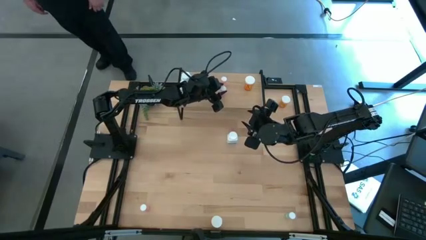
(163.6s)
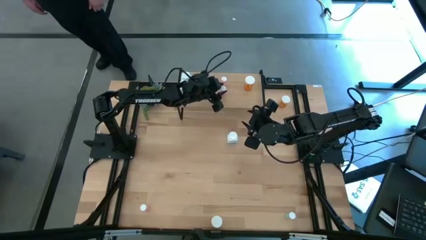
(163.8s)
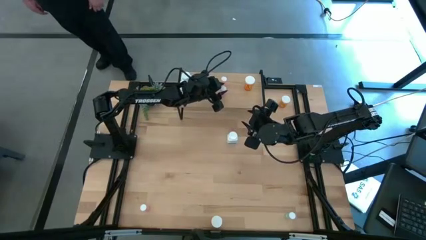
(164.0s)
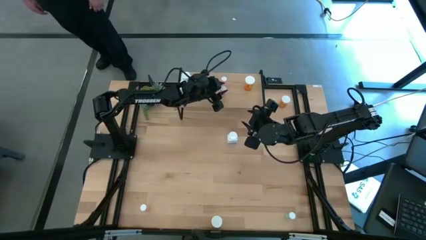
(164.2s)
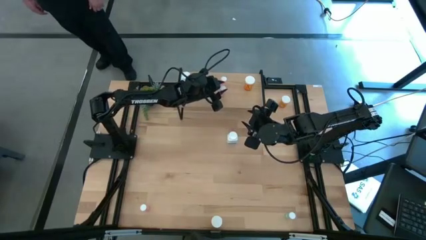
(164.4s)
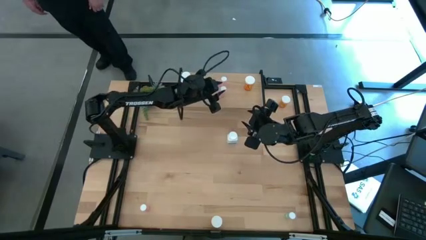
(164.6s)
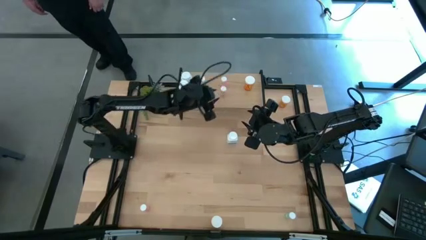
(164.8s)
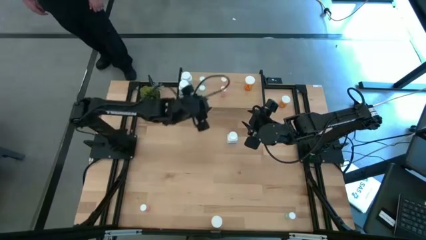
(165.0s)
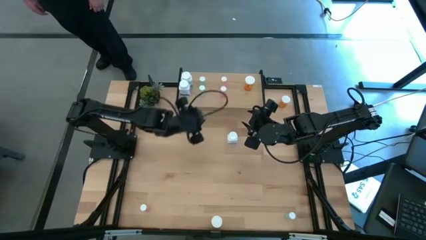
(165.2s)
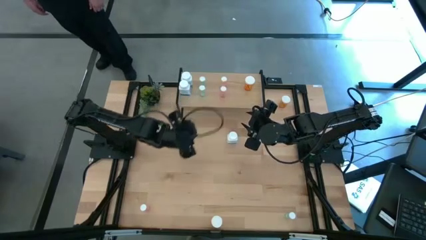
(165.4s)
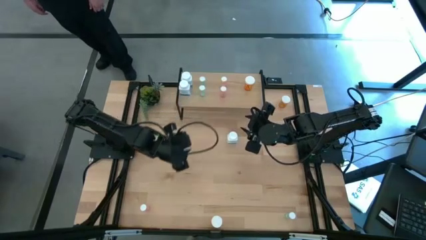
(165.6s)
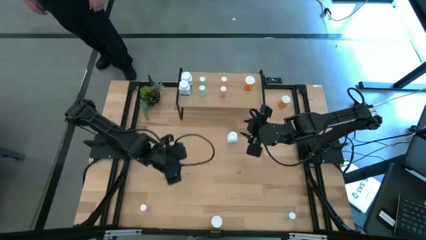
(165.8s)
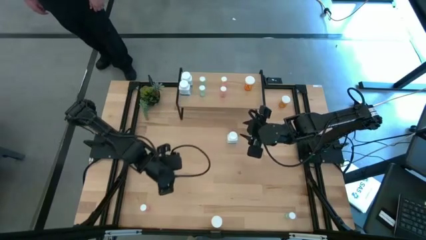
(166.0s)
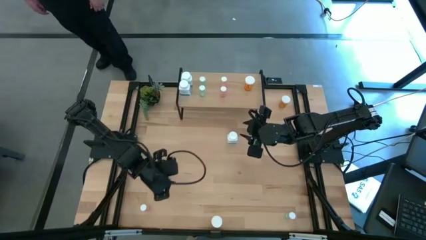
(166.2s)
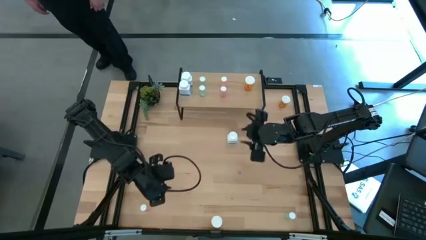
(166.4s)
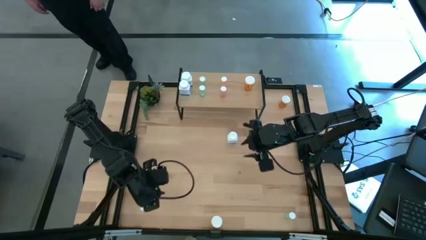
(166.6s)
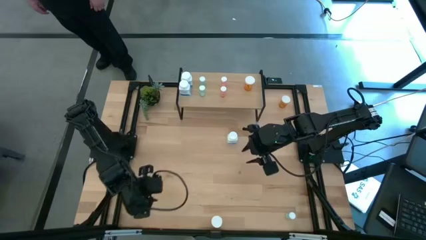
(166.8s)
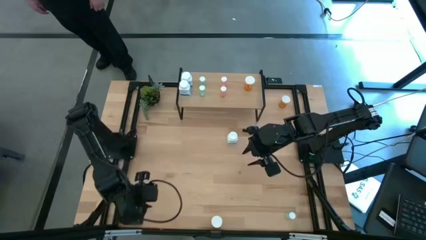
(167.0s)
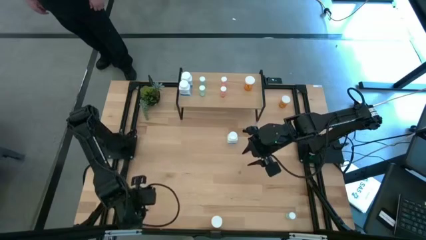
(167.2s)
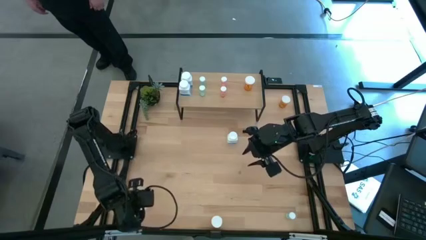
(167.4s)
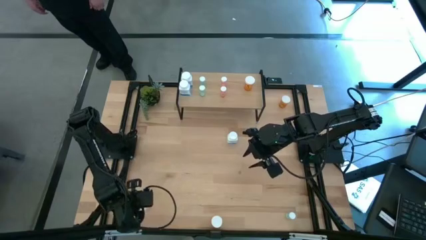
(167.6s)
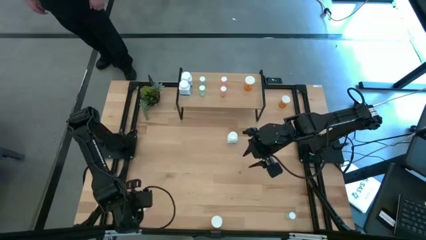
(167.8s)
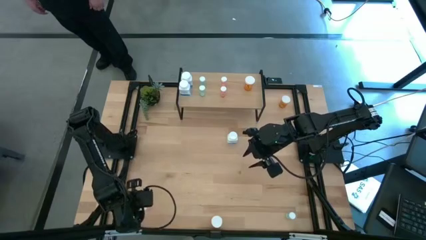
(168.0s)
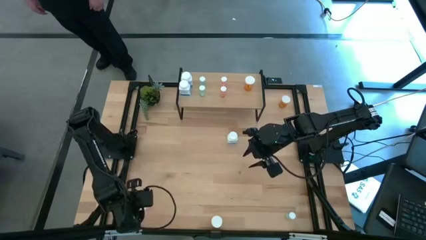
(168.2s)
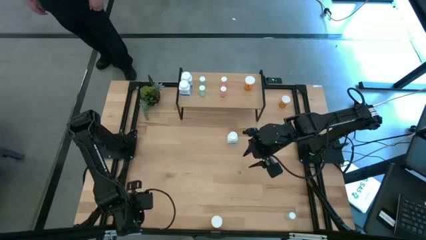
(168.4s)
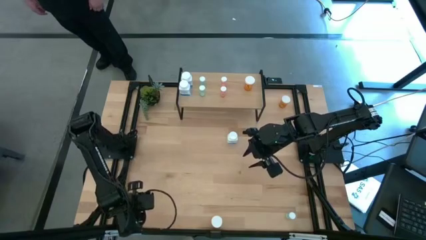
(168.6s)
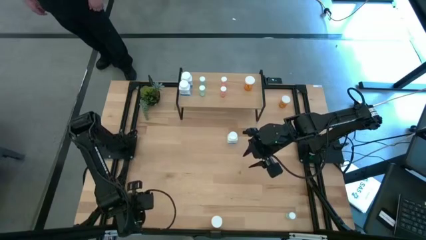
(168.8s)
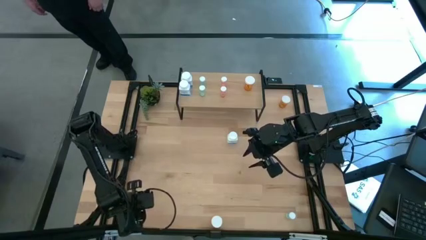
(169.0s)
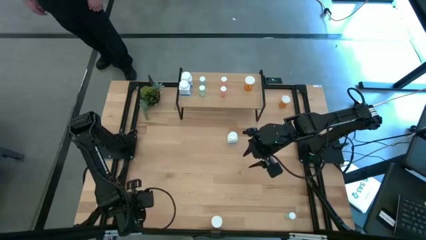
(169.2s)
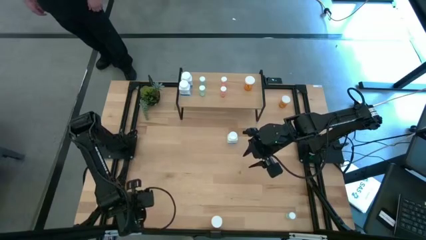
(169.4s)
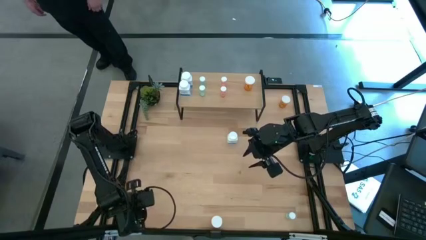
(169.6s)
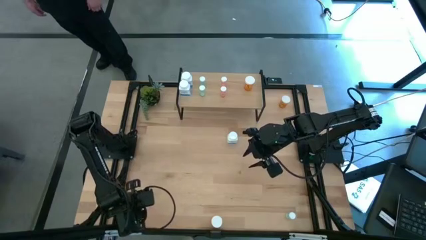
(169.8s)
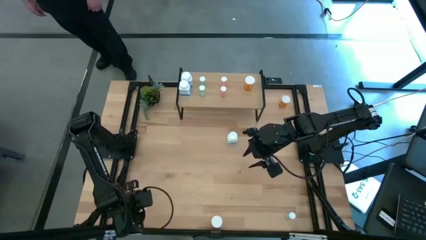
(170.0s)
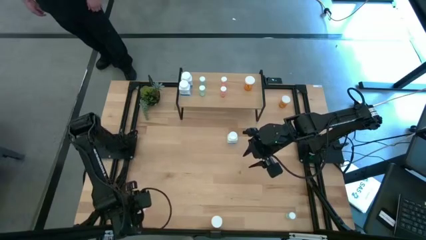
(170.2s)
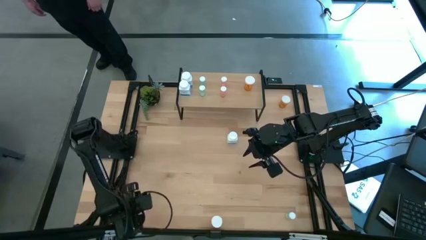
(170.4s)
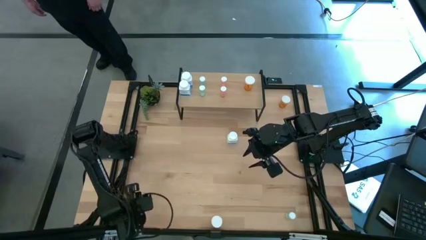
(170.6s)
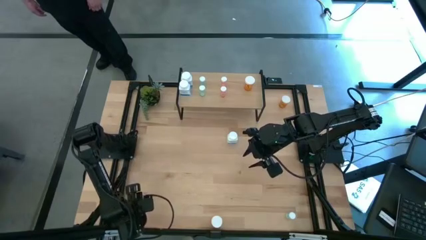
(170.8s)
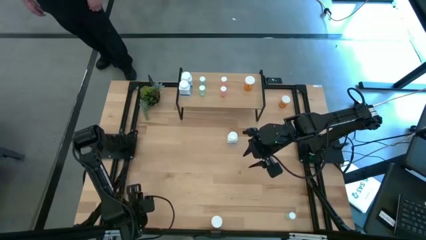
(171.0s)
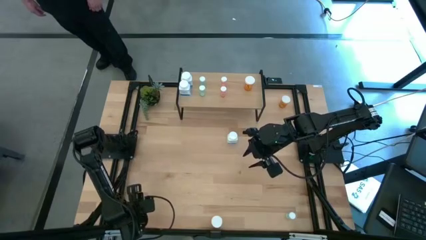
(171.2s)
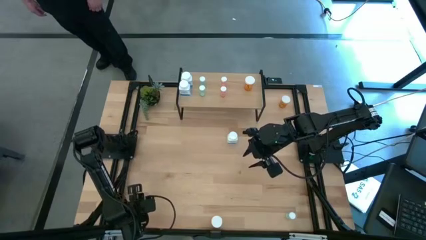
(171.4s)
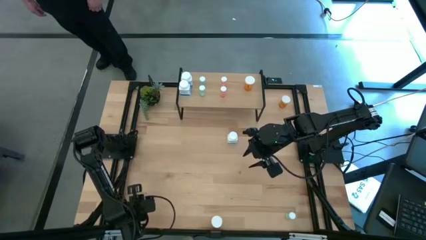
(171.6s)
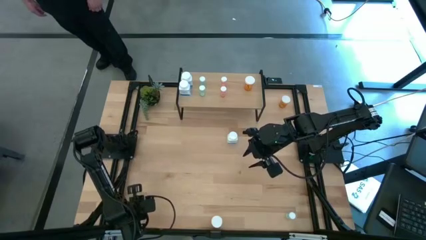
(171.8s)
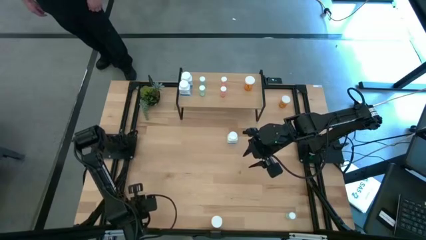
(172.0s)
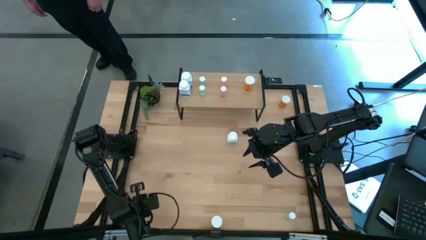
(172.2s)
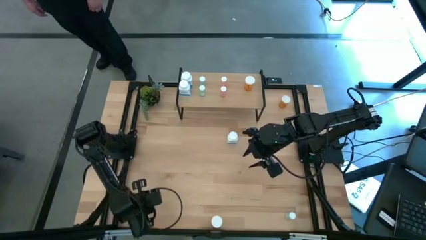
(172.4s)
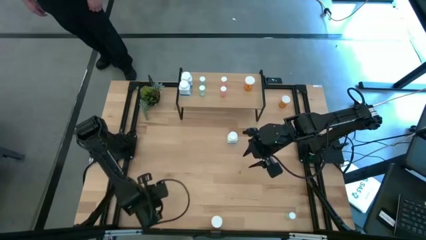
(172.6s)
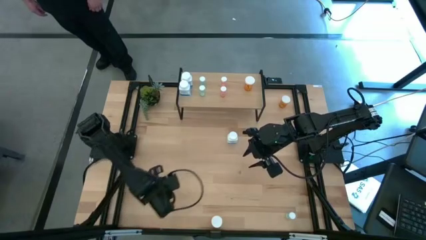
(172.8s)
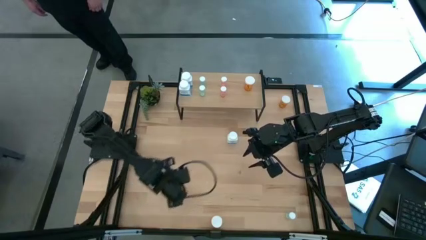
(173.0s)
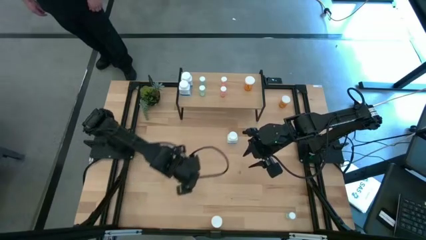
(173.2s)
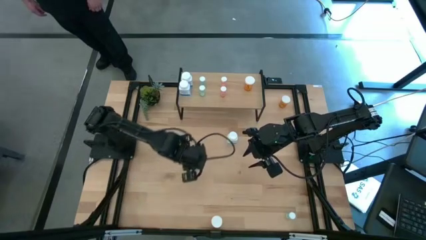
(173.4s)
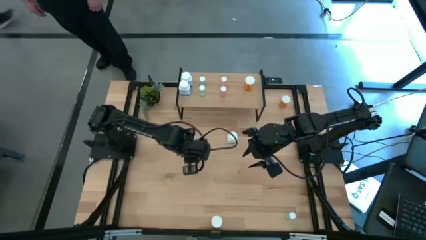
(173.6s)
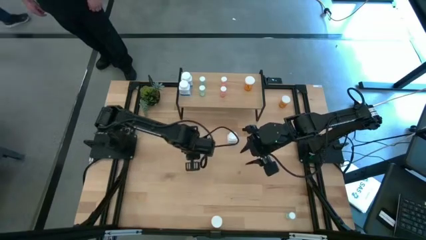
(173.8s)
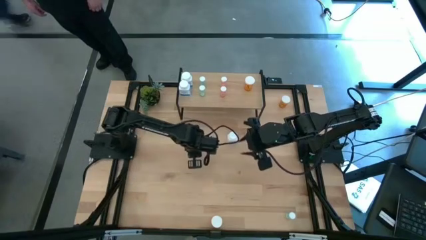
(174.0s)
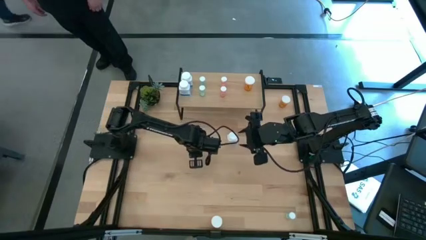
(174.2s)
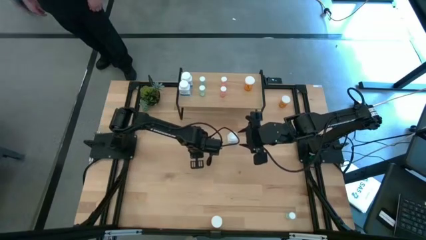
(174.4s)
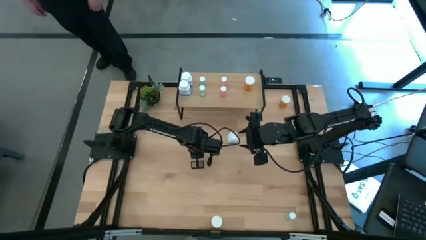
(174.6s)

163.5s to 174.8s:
Task: Pick and place medicine bottles onto shelf by color
Put the pink pill bottle on the shelf aligned with the other pink pill bottles

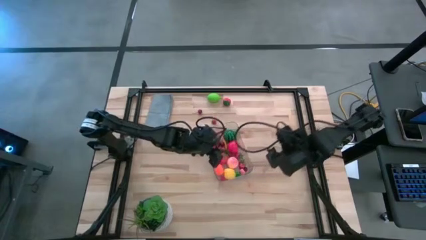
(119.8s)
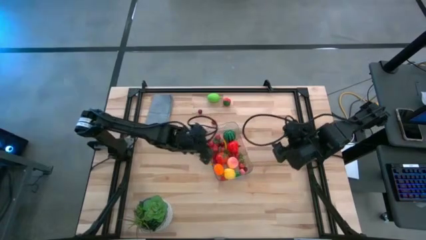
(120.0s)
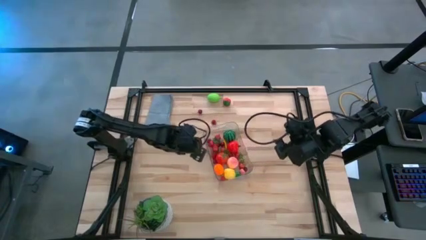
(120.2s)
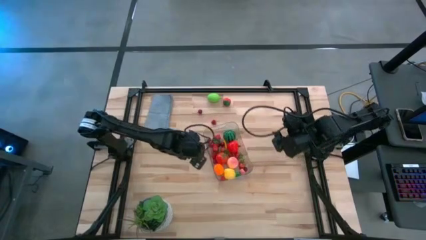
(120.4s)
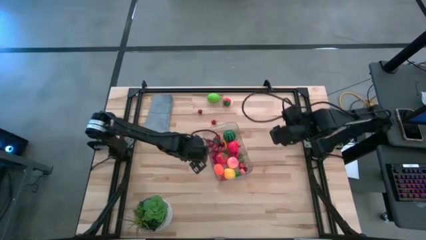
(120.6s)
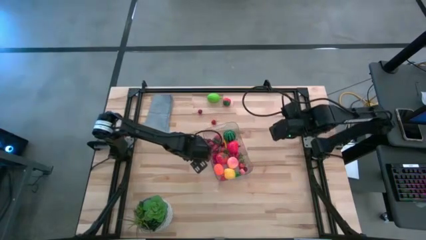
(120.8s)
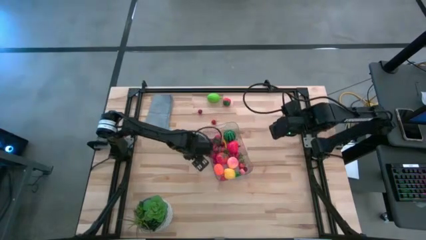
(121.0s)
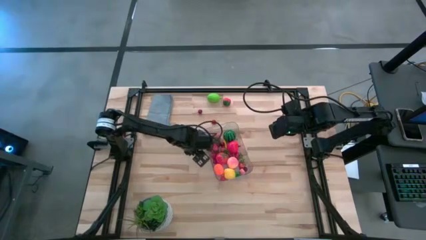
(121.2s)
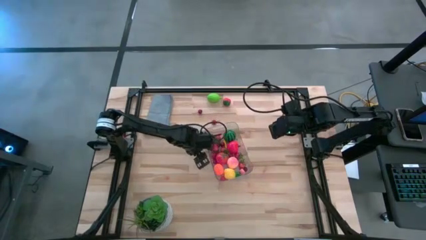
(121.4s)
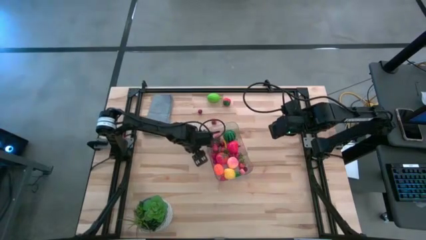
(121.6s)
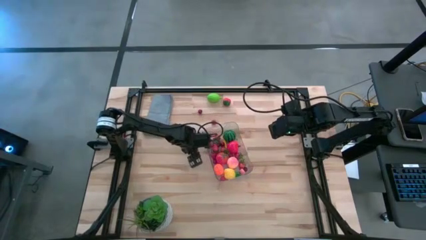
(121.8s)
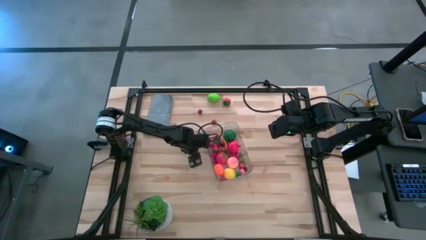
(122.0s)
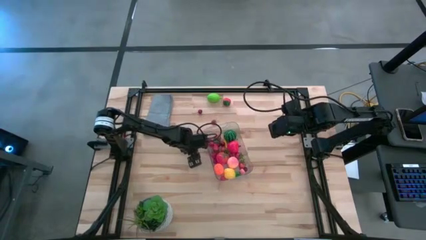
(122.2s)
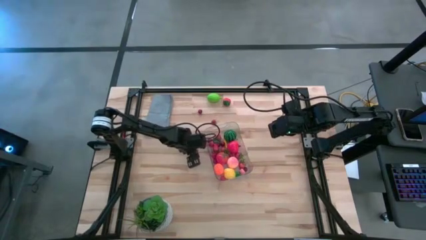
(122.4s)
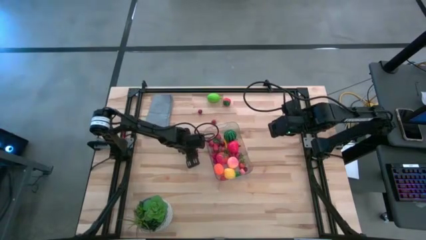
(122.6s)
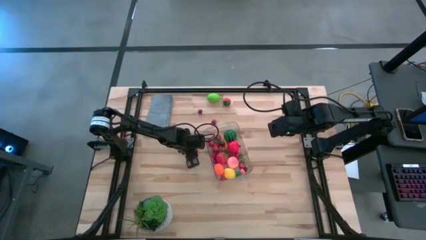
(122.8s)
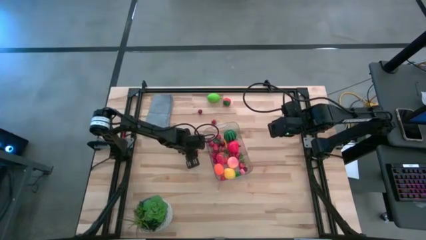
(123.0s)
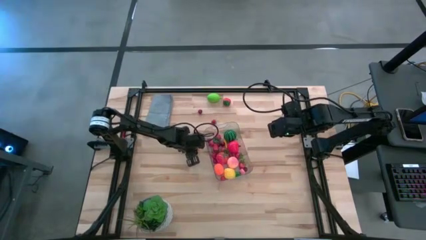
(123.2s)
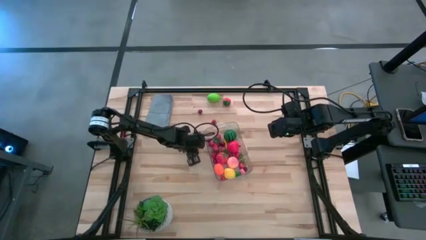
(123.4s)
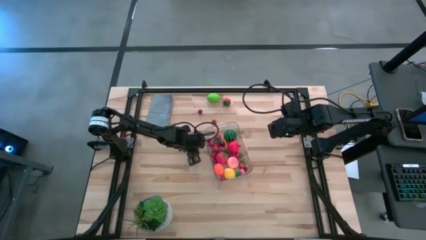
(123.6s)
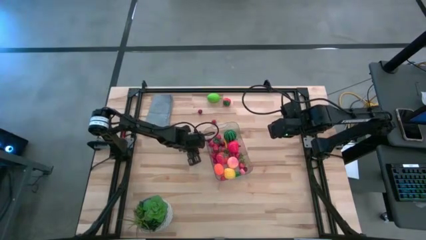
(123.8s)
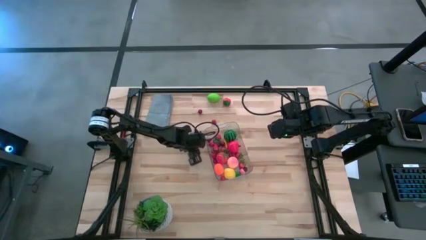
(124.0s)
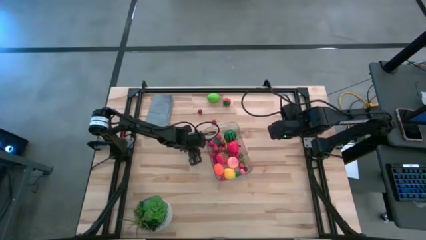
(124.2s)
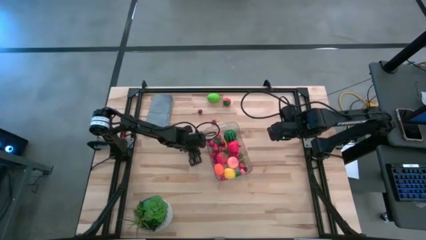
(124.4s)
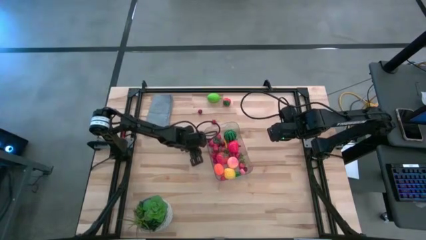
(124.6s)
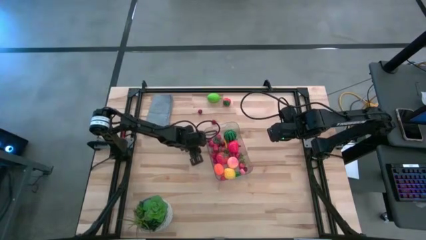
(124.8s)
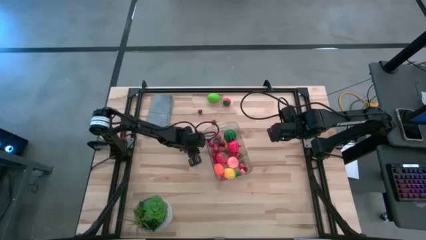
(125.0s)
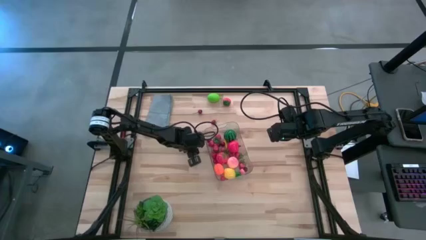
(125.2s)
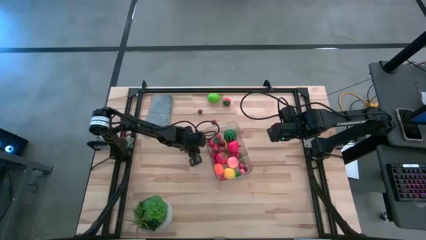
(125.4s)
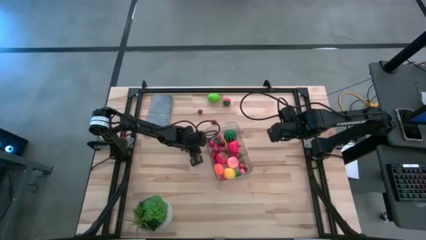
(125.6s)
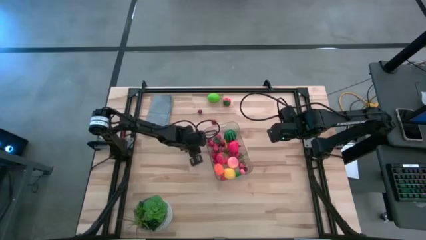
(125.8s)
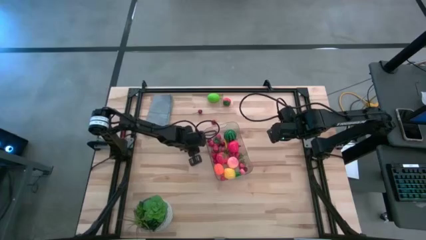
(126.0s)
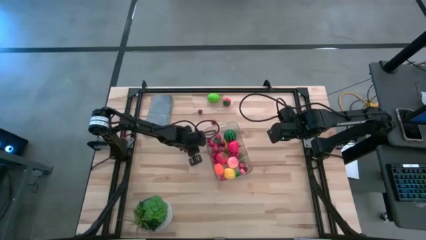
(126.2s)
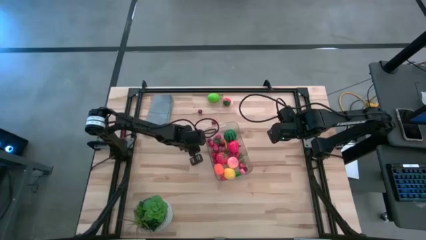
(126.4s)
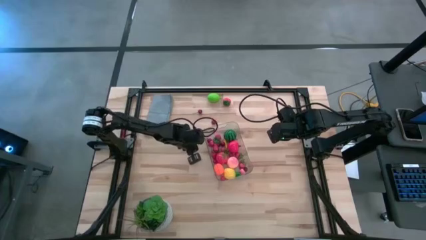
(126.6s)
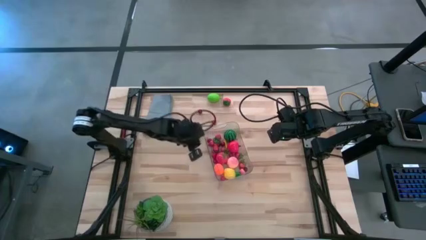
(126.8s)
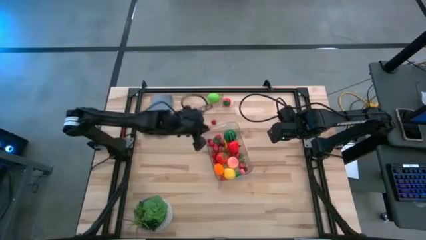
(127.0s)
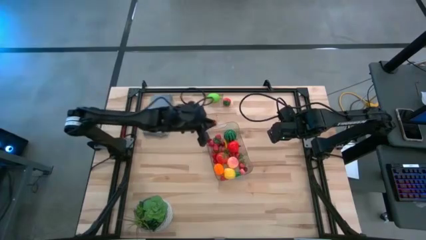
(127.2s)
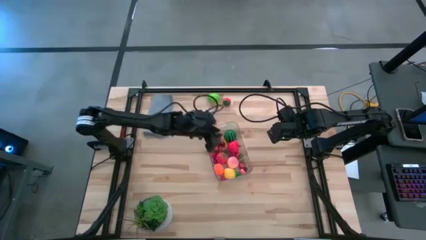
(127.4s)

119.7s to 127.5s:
Task: Pick and placing Produce into tupperware
Put the red cherry into the transparent bin
